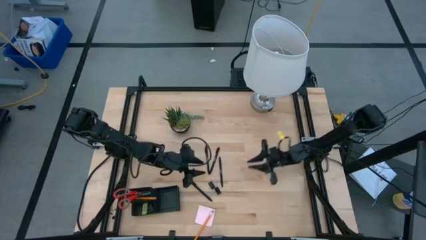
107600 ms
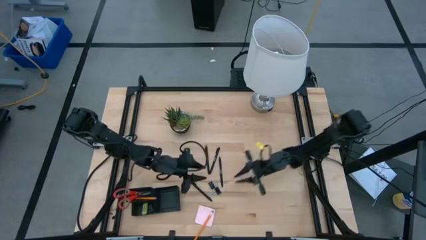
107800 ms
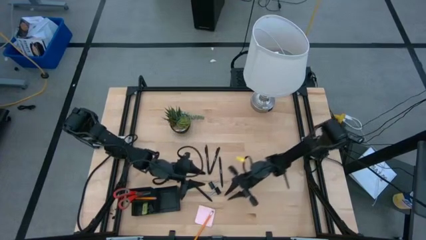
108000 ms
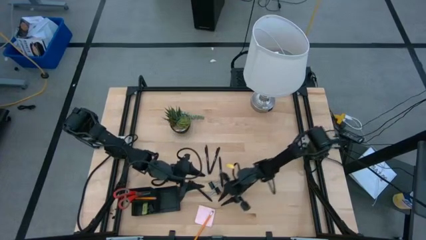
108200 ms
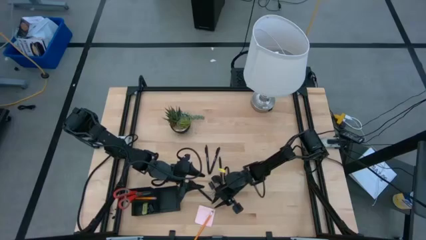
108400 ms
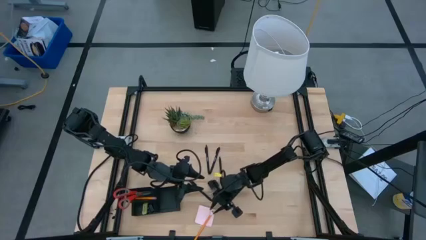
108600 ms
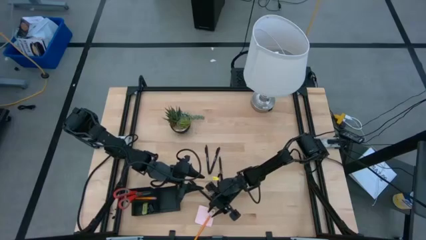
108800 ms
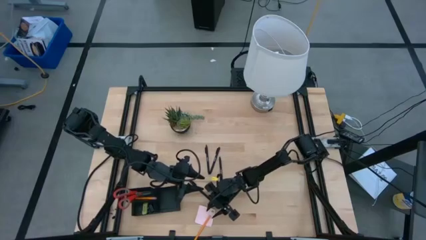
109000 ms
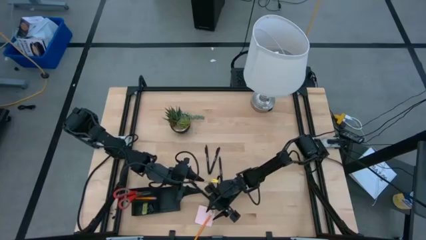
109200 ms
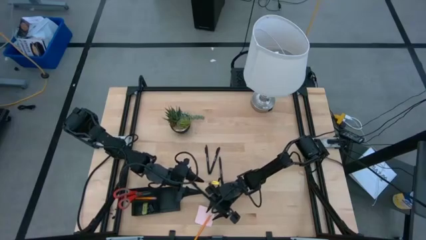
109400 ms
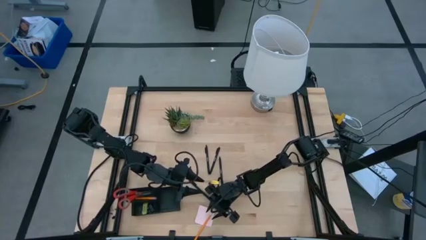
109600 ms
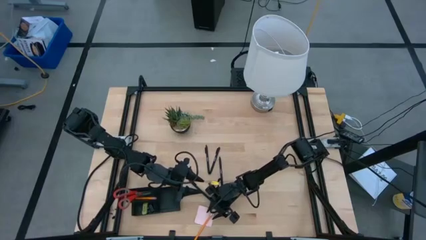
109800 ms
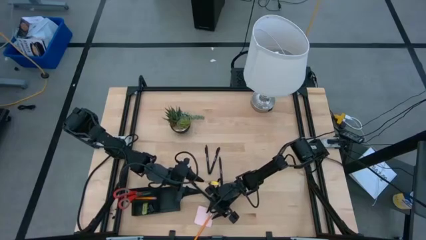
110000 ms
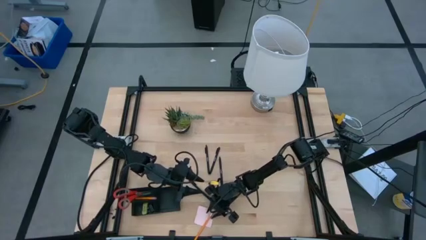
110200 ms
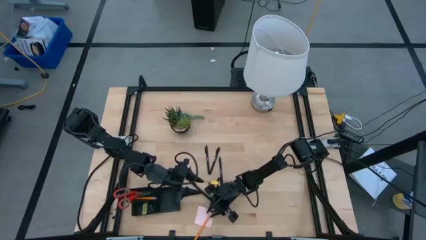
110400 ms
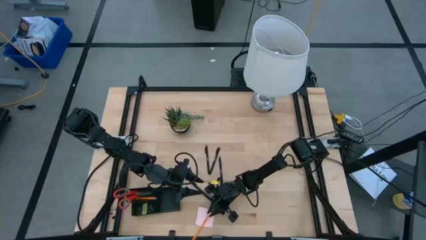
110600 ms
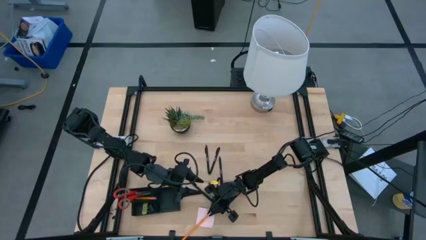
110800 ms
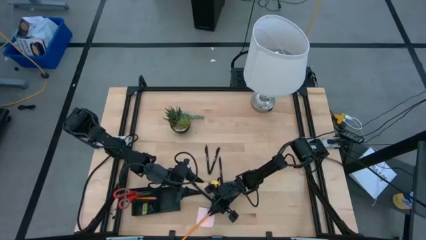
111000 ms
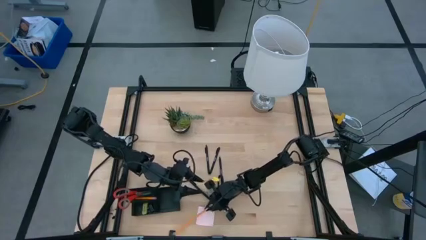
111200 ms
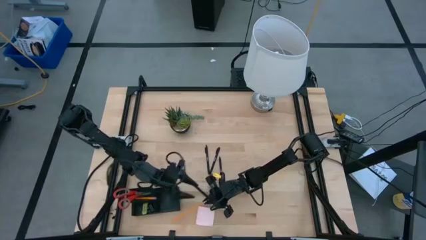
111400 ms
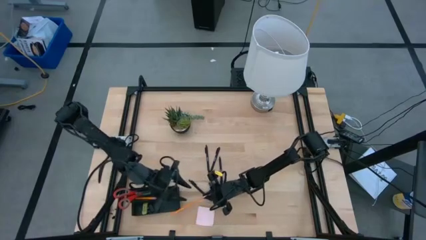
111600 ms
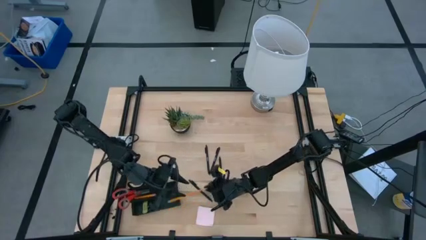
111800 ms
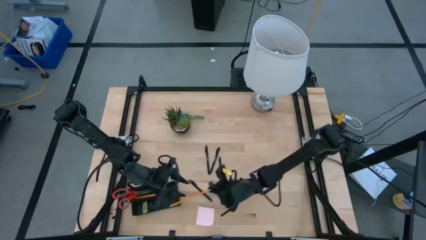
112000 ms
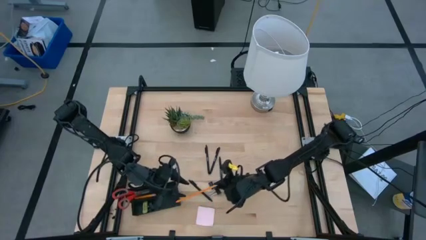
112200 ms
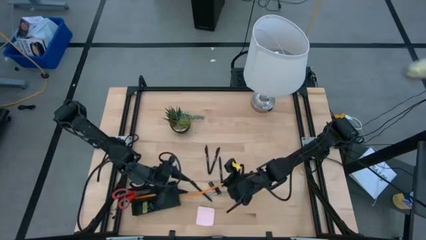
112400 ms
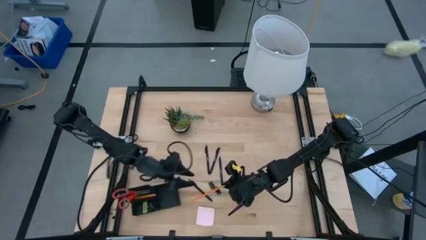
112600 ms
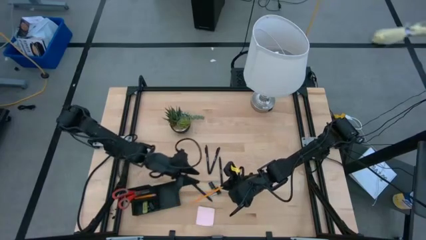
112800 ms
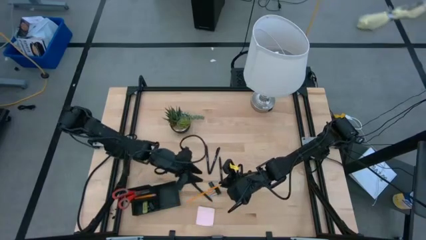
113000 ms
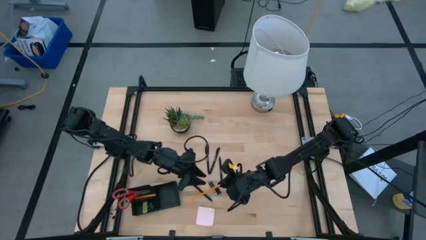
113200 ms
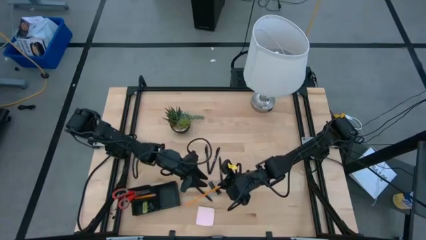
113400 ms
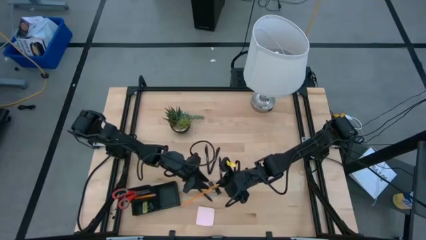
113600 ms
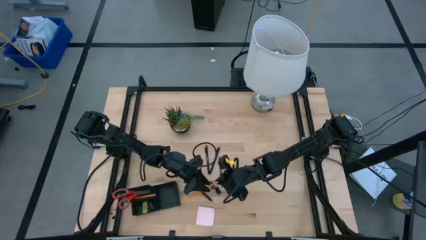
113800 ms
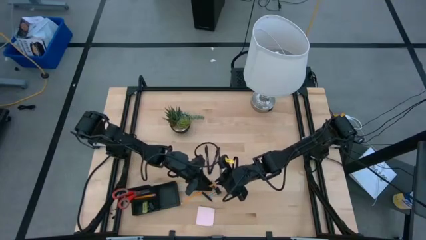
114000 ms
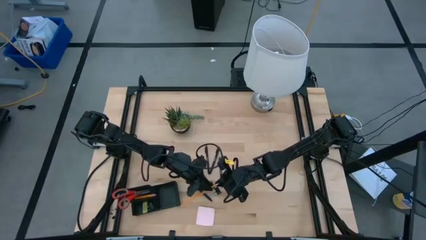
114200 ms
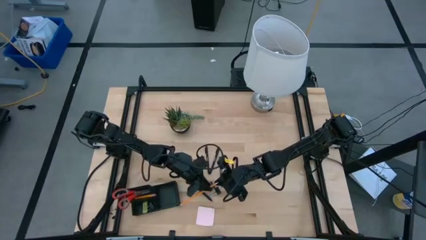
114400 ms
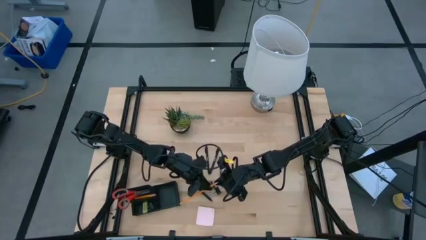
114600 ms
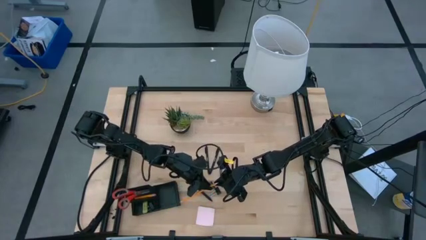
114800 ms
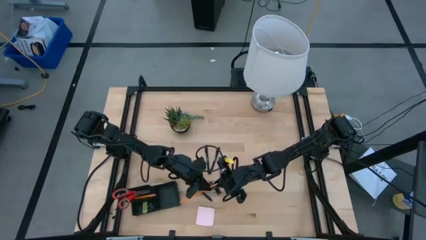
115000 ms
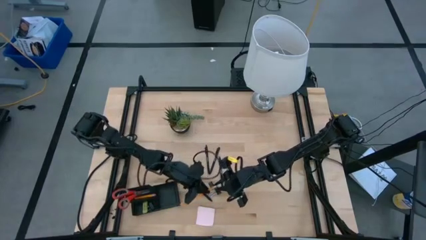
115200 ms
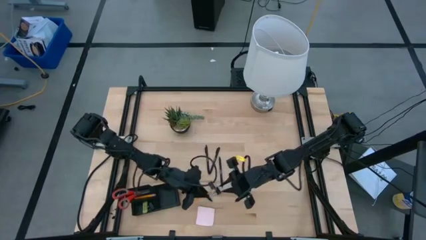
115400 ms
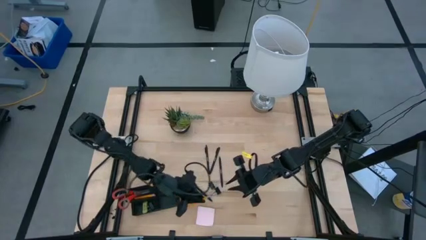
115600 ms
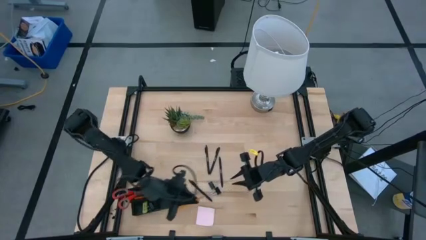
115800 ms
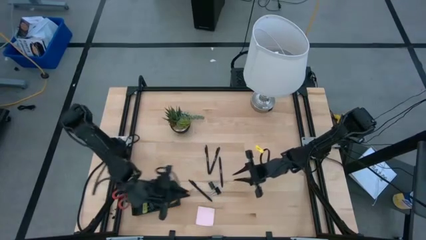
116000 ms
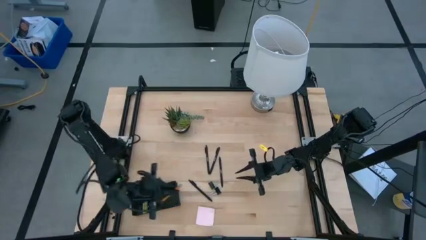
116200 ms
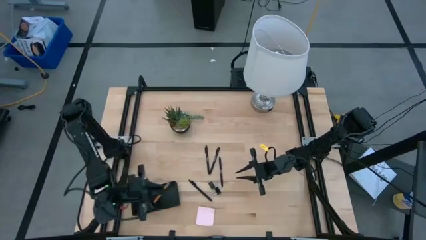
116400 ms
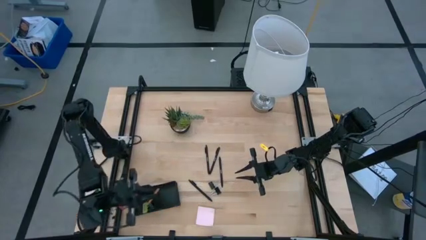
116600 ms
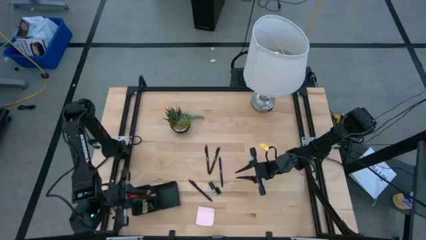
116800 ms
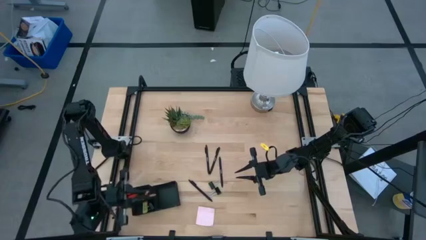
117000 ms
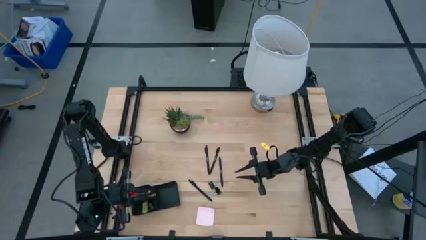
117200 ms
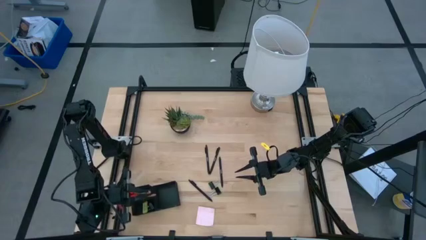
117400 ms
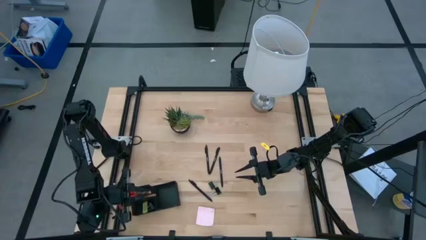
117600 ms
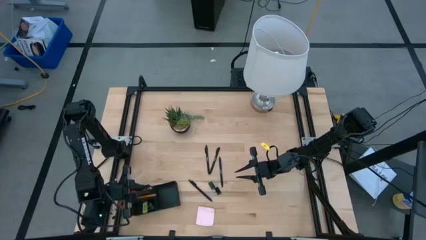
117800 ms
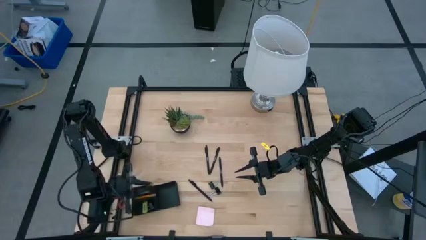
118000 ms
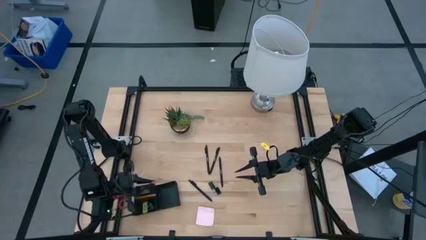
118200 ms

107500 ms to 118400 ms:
Task: Pick and place office supplies into organizer
Put the pencil into the top left section of the desk organizer

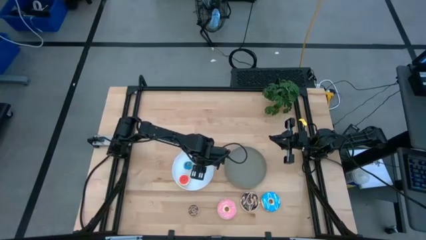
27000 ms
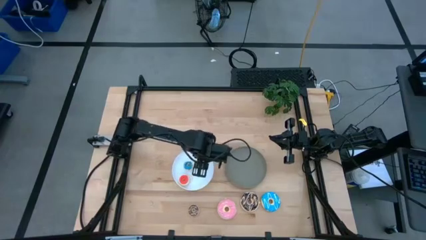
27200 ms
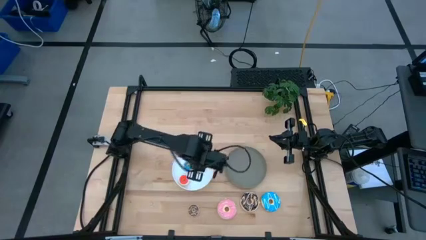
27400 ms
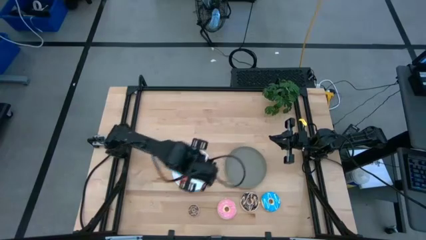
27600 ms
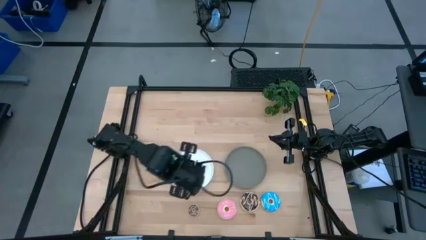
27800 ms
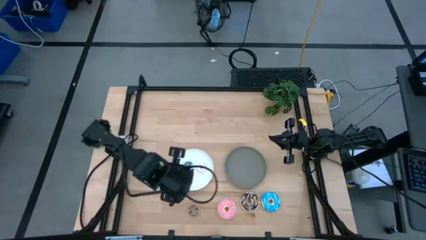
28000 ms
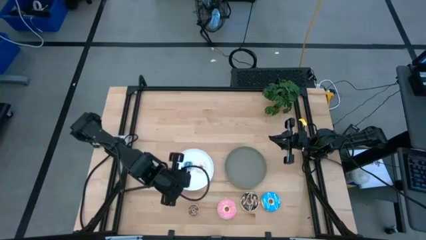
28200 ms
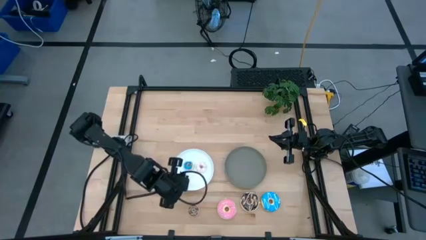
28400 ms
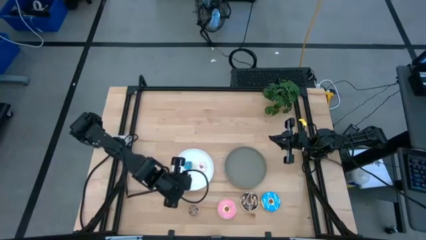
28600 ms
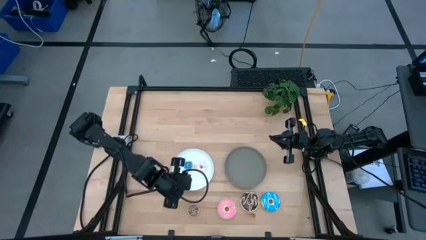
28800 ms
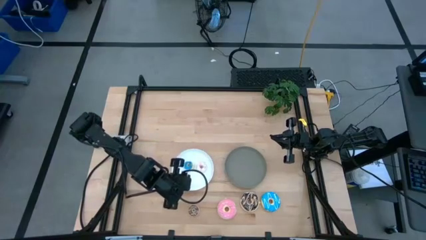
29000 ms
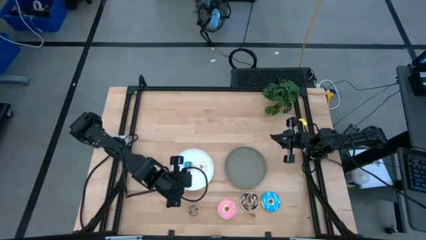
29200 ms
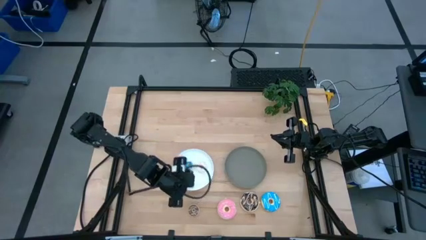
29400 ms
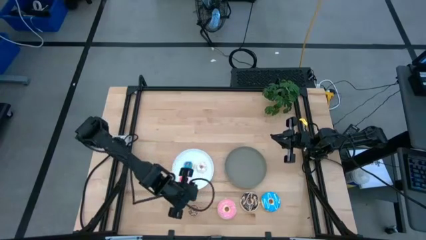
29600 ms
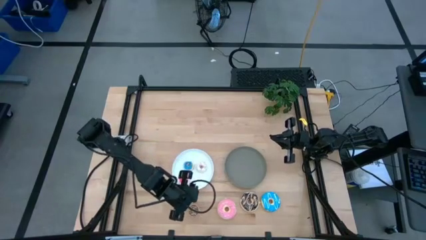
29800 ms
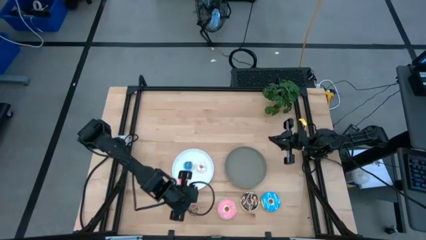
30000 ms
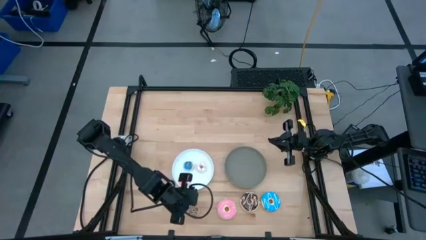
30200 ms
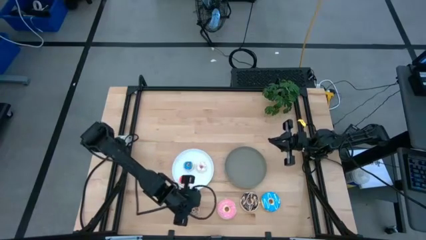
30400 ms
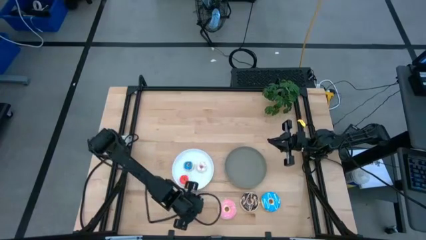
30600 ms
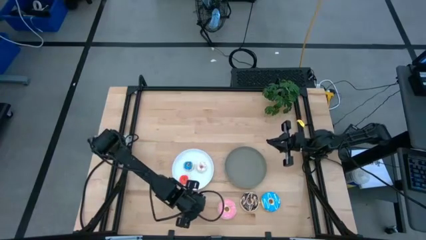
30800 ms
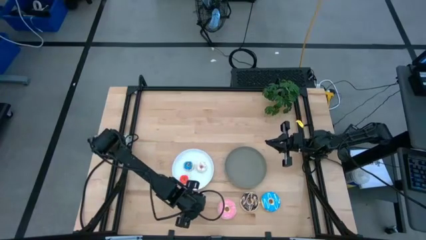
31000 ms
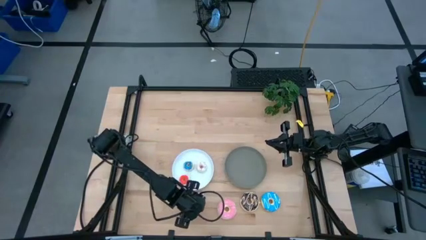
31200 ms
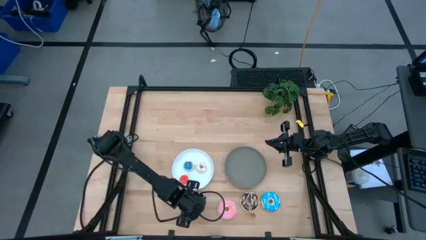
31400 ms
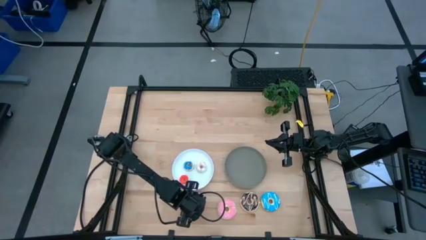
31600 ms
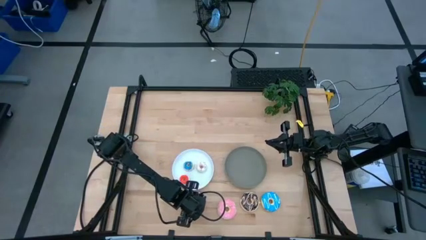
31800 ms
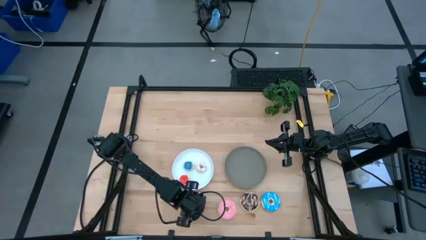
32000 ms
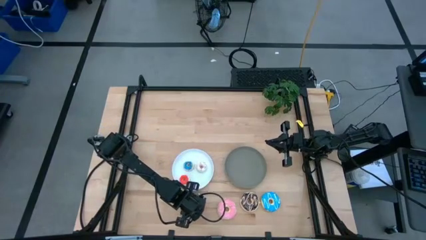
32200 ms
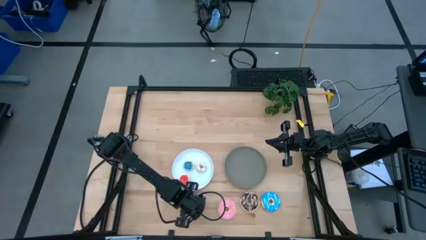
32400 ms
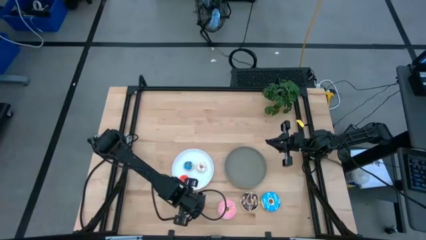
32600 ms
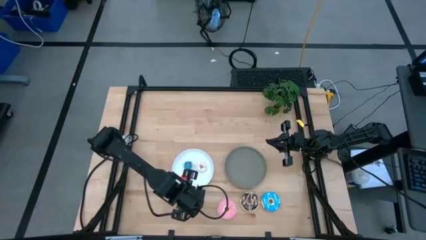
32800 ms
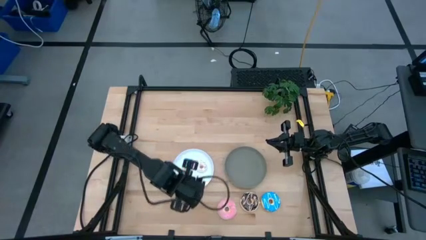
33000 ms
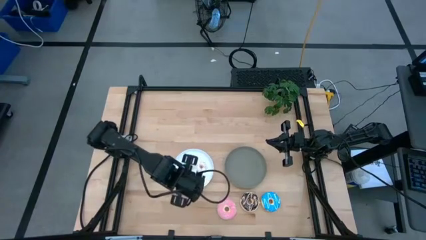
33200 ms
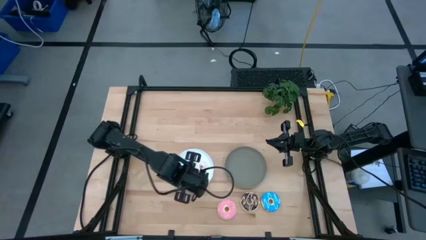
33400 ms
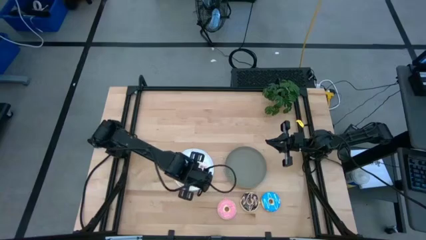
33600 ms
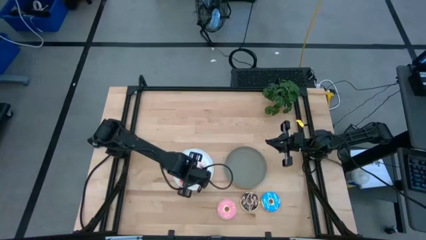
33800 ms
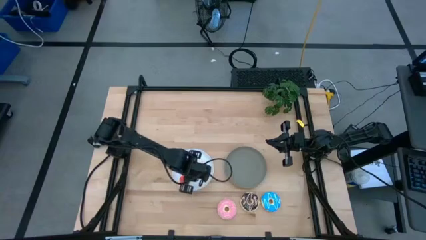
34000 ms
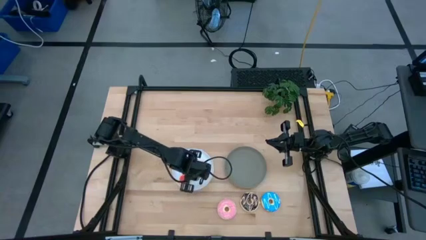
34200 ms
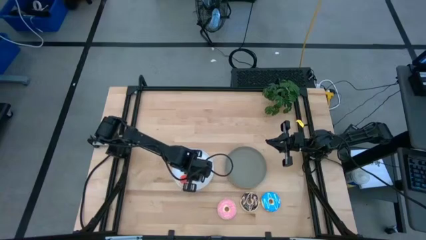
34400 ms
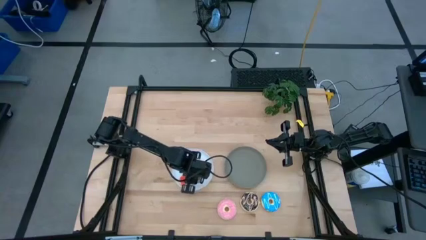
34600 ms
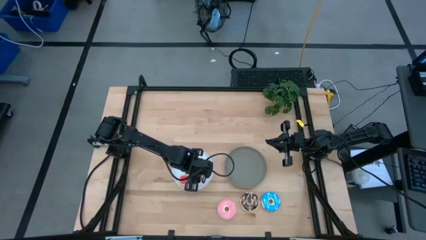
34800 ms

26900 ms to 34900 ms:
Task: Pick & Place donuts
Put the small brown donut on the white plate
